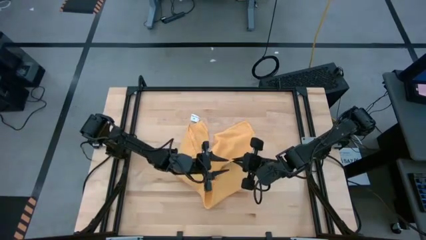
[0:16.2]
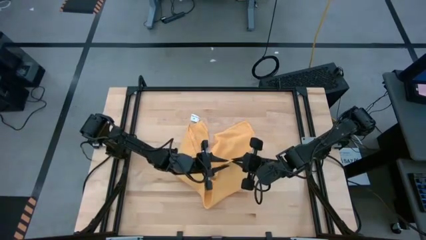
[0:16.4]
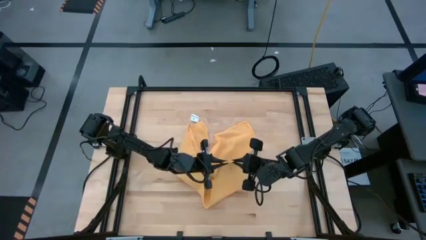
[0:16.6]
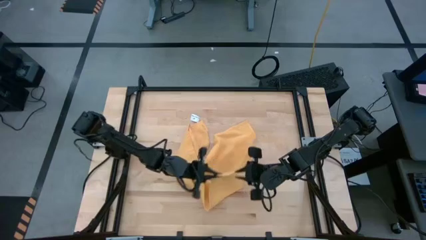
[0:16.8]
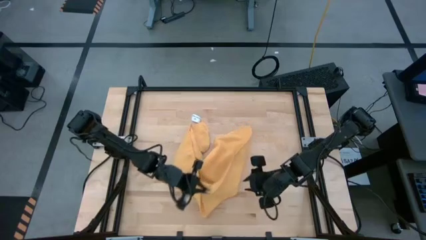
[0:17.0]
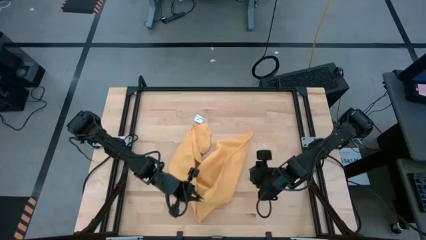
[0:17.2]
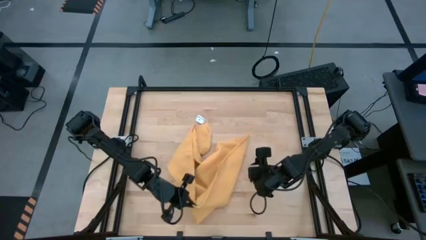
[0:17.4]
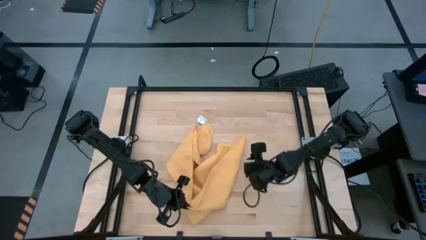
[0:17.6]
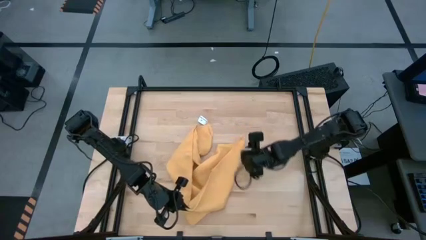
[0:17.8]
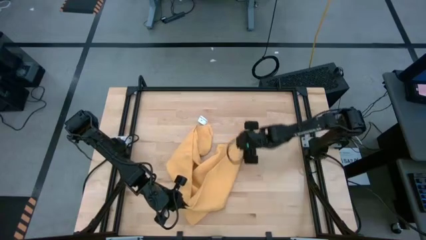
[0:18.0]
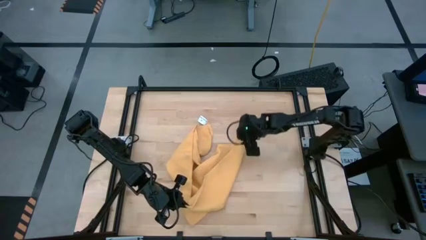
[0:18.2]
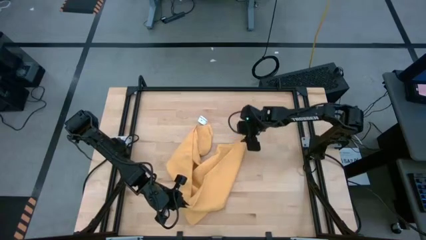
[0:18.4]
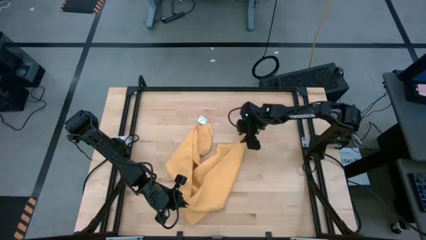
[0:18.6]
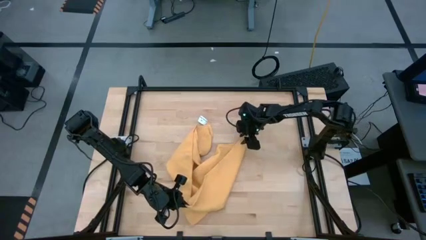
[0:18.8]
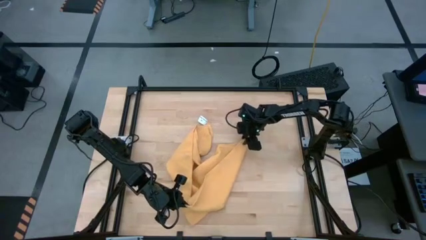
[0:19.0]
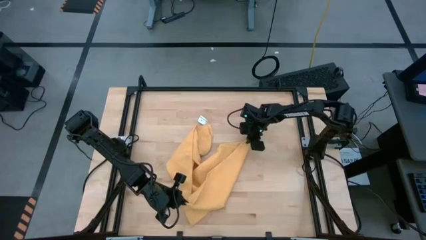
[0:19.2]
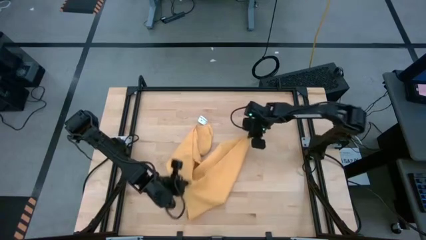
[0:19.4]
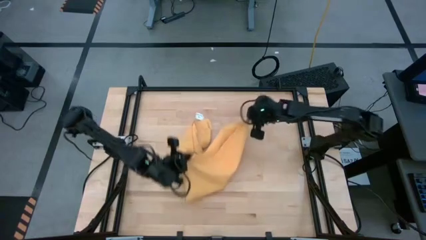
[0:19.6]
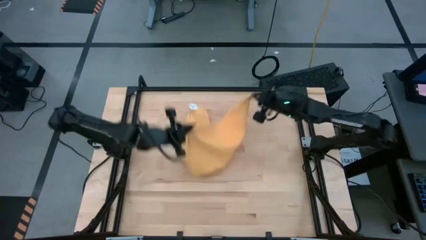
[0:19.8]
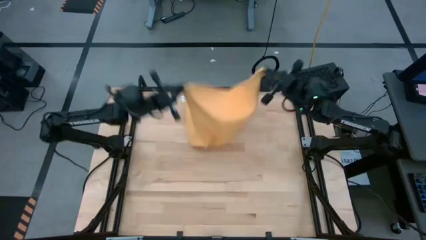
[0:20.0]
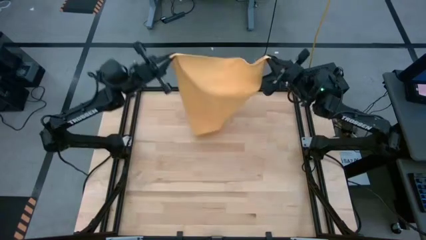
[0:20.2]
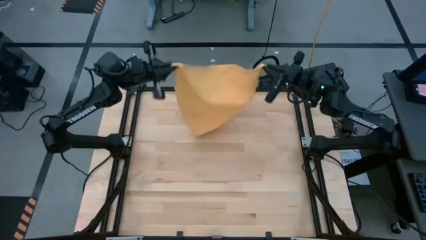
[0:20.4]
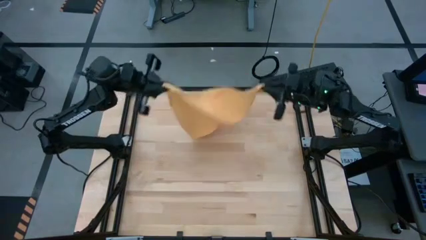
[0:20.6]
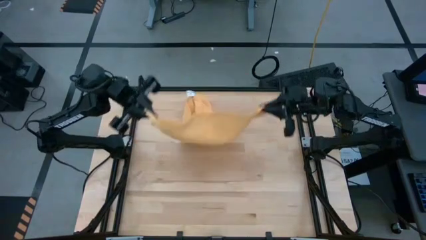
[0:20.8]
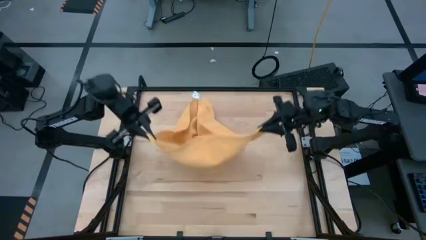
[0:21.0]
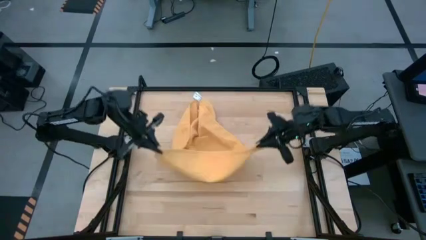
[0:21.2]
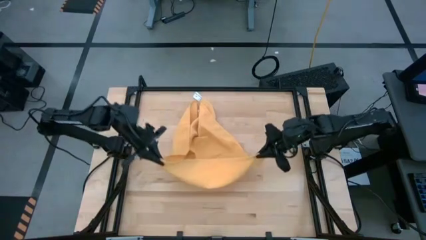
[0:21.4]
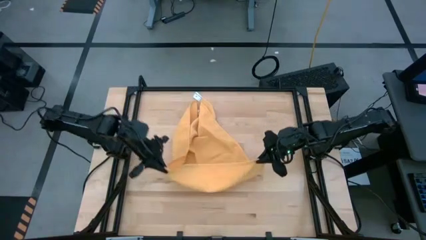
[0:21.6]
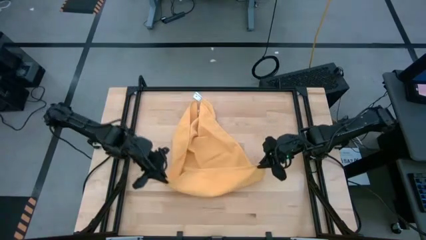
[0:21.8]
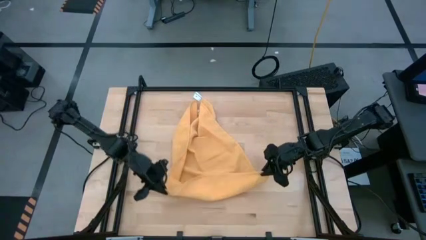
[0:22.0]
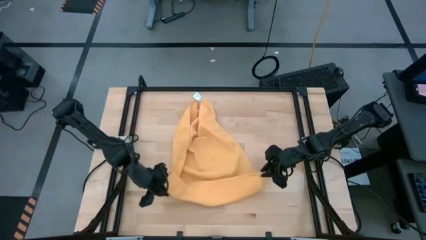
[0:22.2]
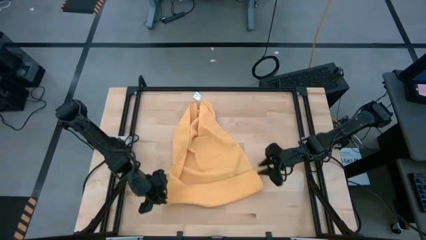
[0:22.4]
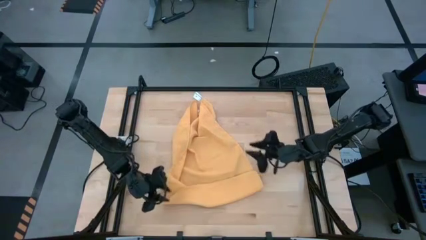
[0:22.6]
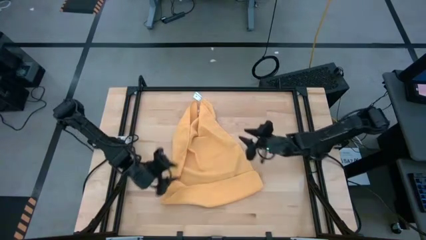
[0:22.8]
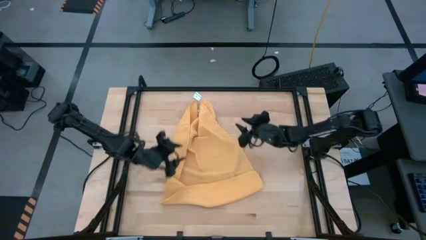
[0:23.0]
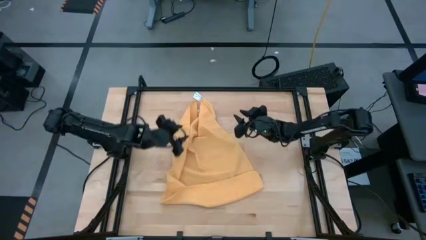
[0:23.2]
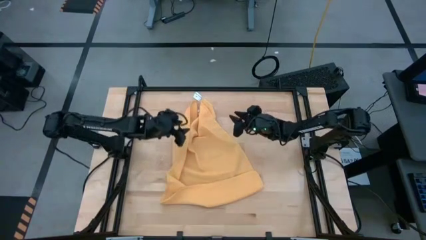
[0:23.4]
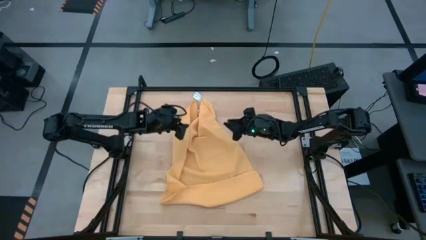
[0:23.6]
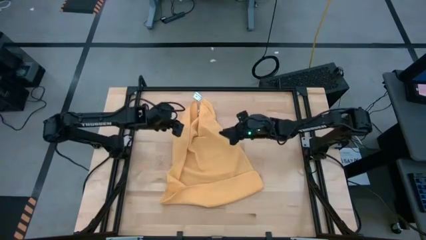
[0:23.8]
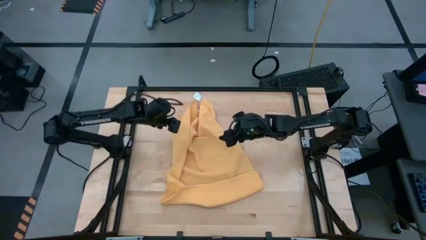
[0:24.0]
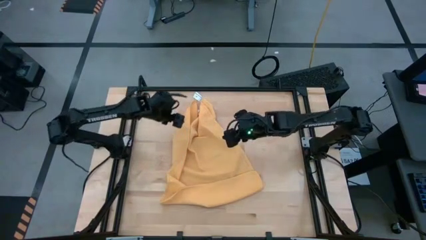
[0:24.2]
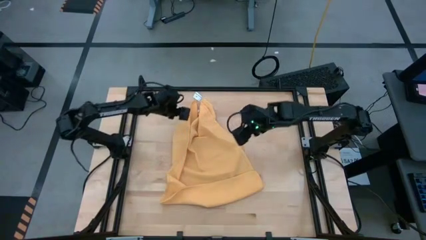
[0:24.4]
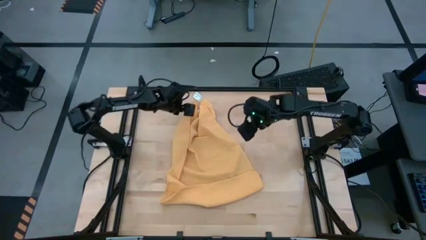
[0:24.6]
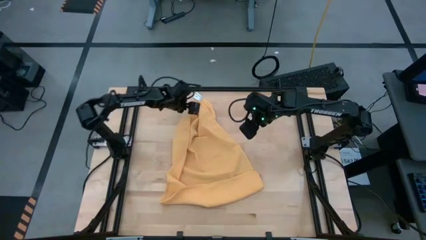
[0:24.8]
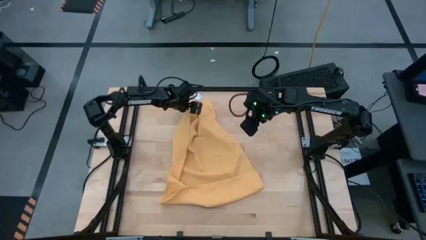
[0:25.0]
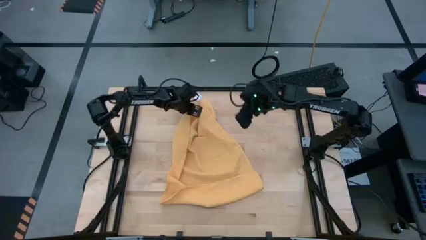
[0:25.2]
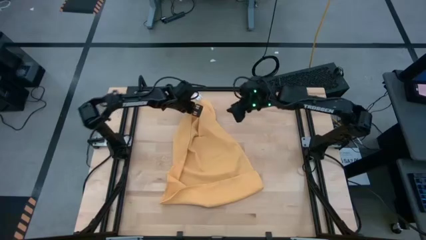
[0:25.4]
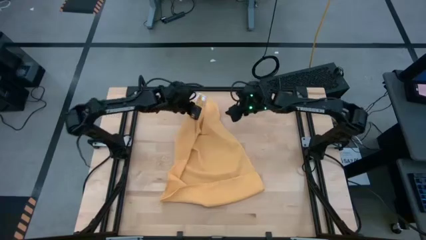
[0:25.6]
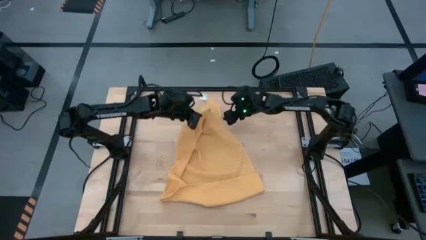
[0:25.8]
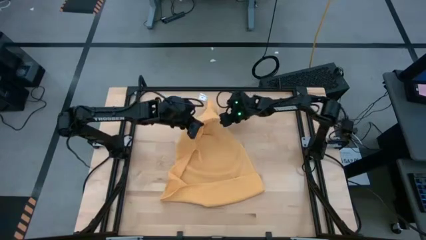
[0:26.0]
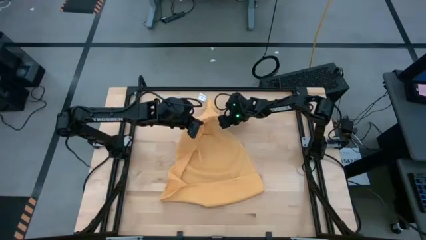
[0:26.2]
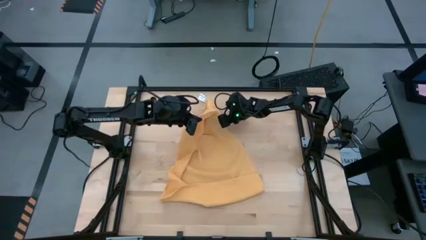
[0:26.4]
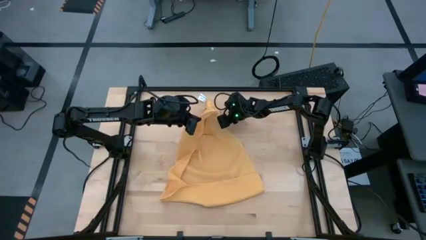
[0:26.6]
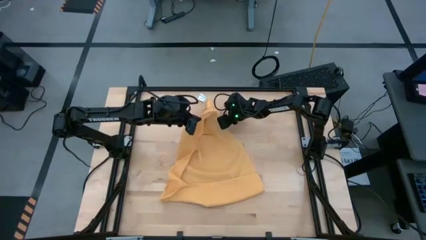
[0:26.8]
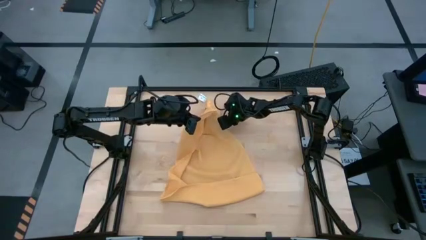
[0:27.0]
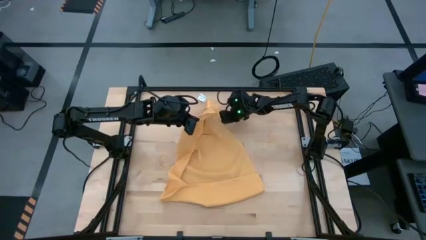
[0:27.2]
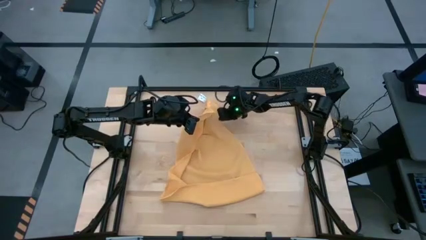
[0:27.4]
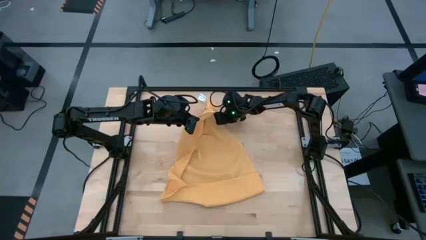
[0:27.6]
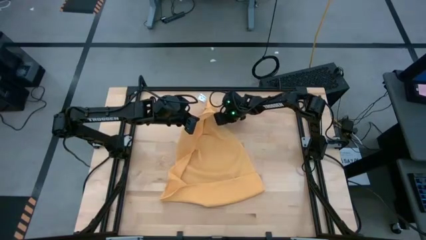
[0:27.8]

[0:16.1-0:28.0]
Task: Roll towel
Roll the yellow towel
